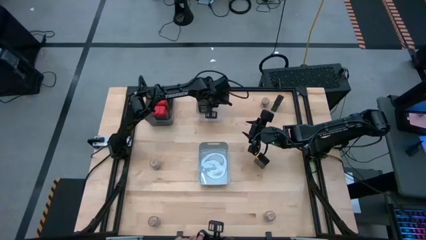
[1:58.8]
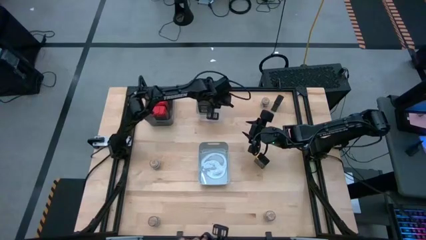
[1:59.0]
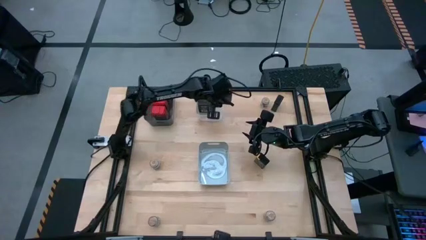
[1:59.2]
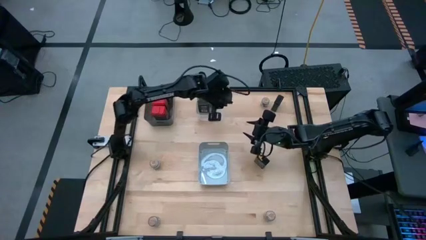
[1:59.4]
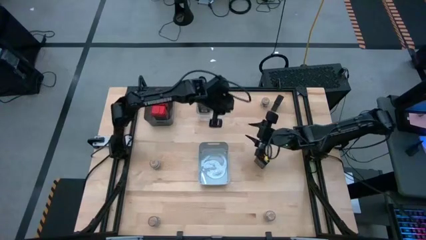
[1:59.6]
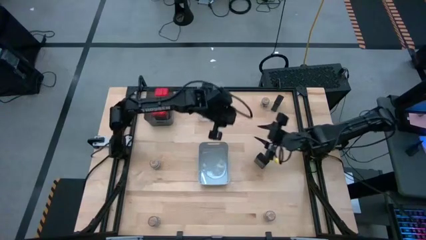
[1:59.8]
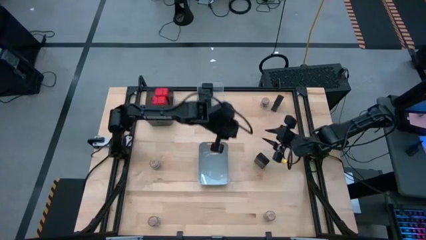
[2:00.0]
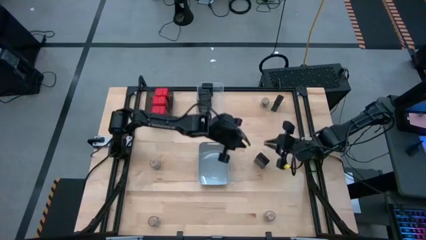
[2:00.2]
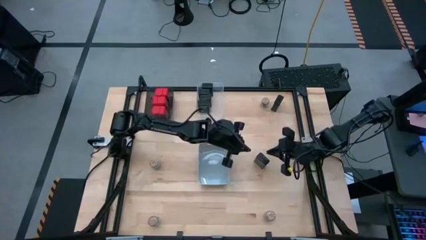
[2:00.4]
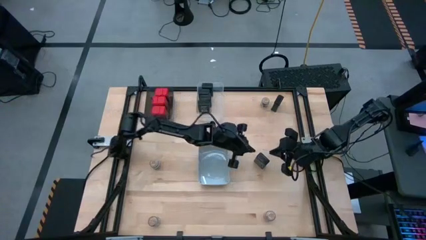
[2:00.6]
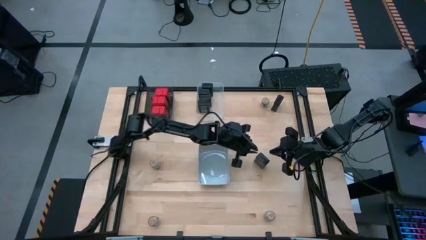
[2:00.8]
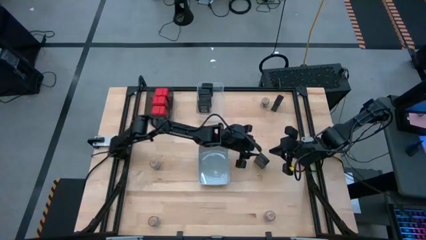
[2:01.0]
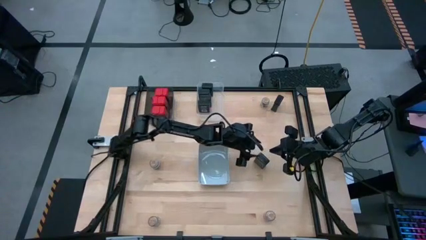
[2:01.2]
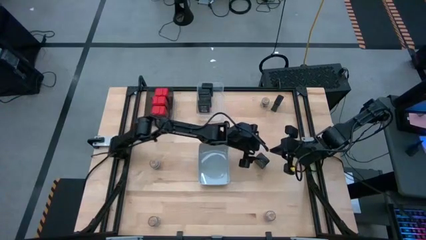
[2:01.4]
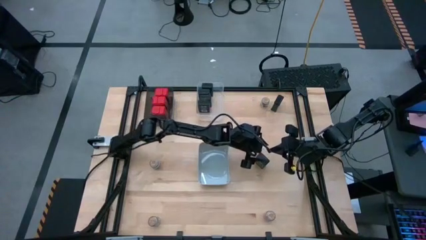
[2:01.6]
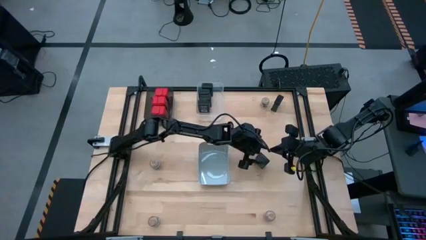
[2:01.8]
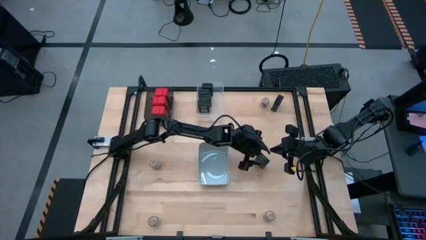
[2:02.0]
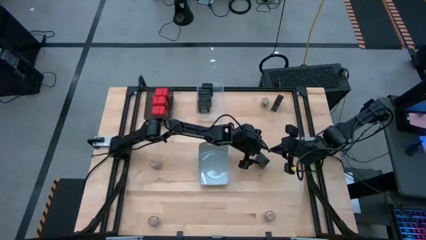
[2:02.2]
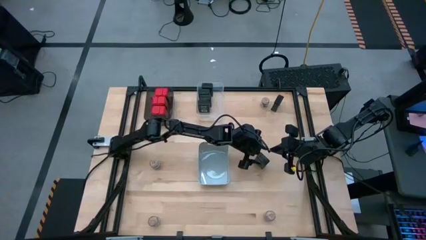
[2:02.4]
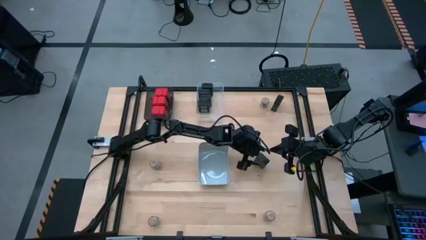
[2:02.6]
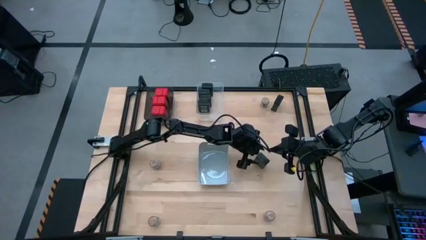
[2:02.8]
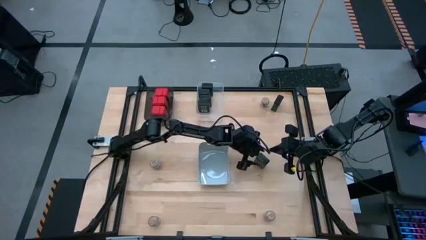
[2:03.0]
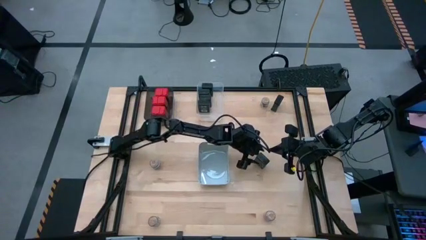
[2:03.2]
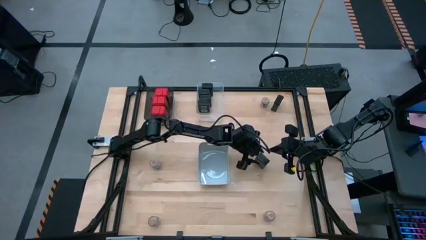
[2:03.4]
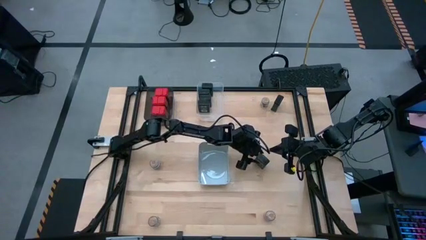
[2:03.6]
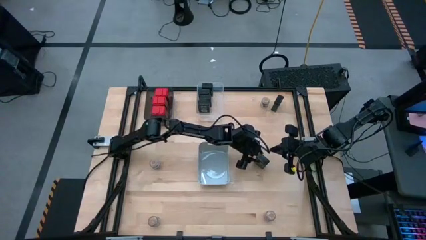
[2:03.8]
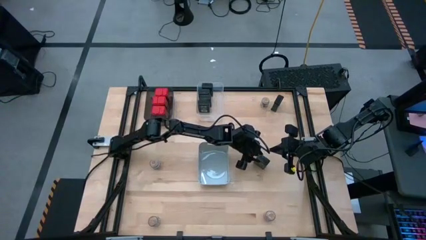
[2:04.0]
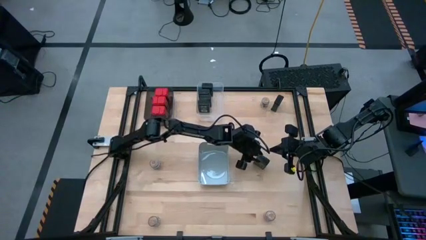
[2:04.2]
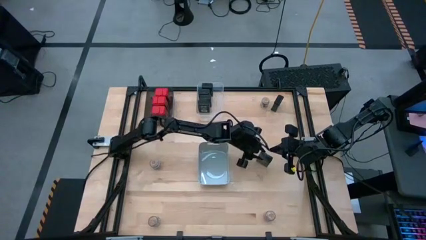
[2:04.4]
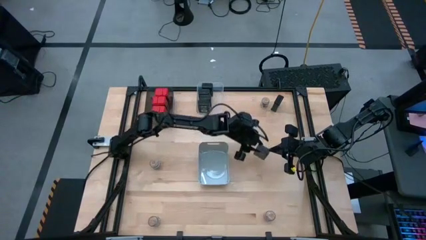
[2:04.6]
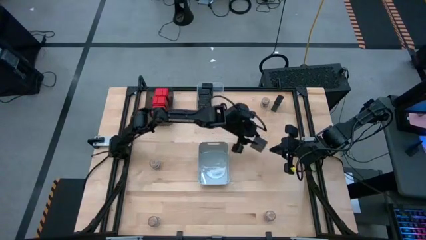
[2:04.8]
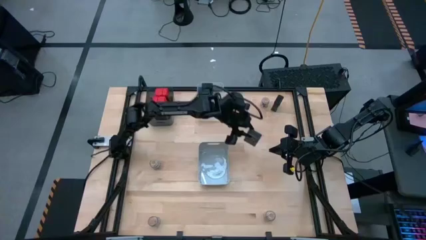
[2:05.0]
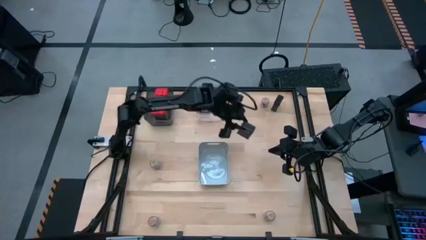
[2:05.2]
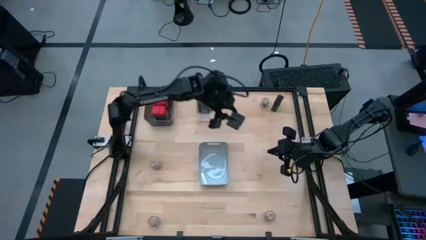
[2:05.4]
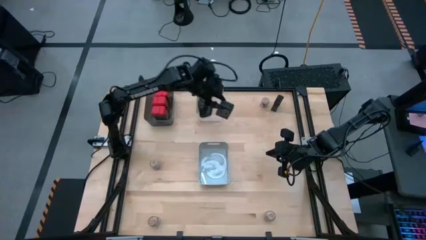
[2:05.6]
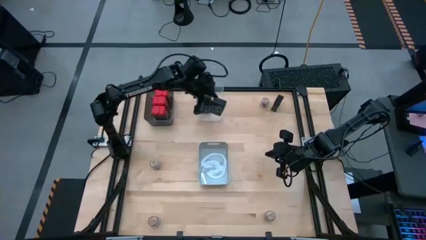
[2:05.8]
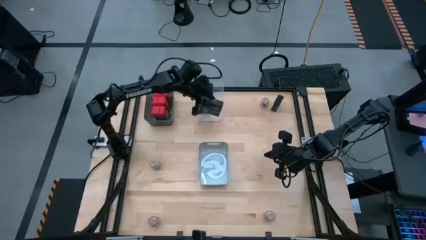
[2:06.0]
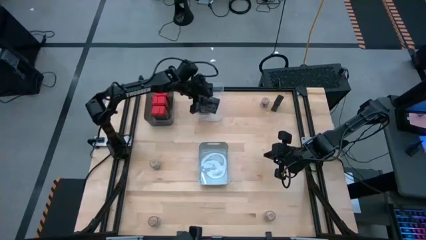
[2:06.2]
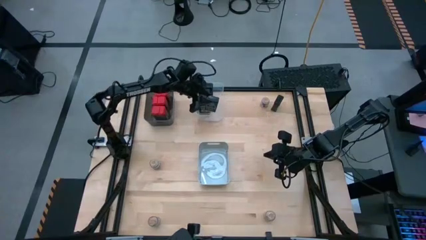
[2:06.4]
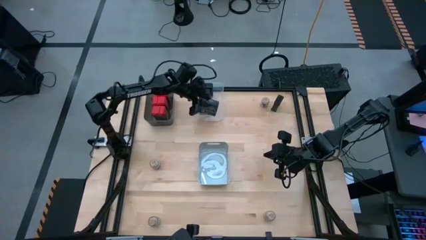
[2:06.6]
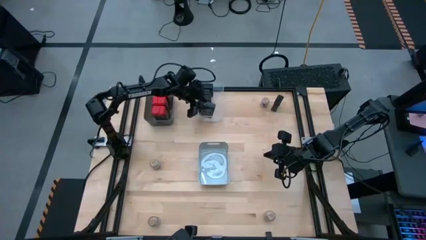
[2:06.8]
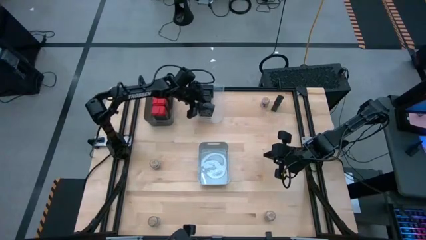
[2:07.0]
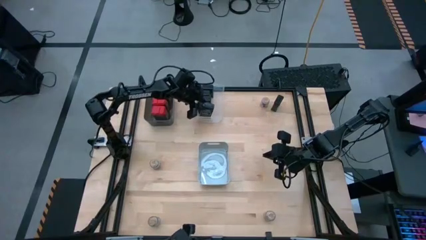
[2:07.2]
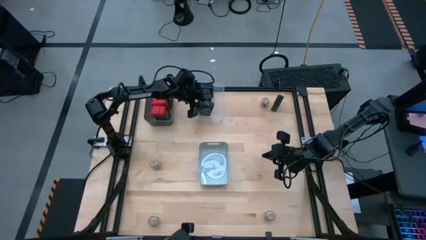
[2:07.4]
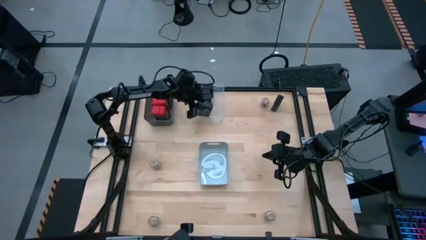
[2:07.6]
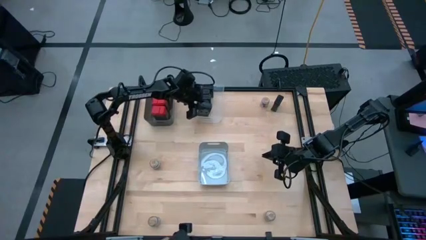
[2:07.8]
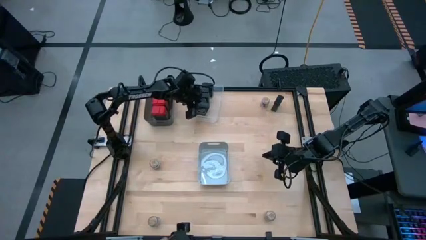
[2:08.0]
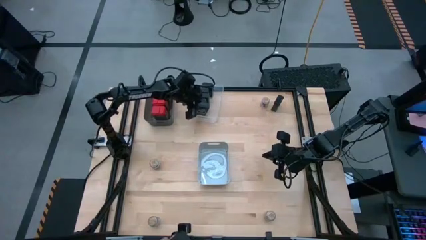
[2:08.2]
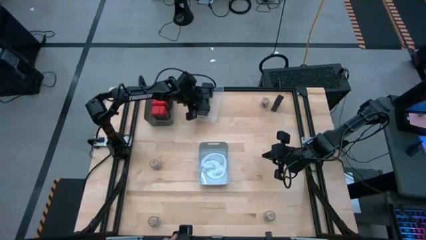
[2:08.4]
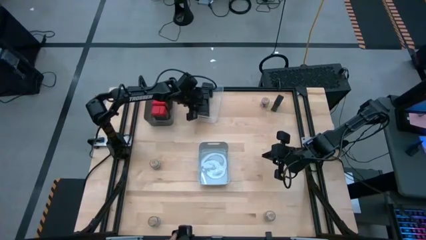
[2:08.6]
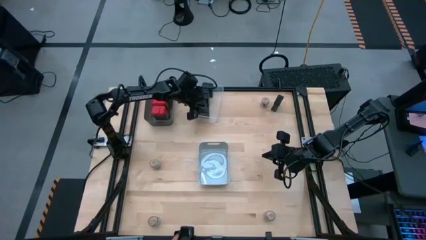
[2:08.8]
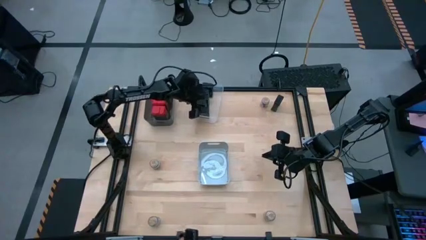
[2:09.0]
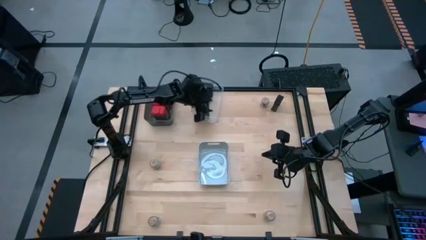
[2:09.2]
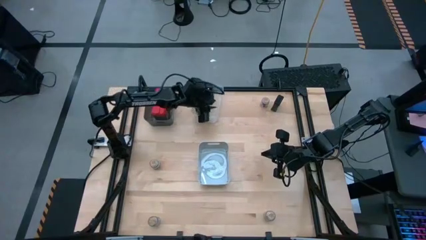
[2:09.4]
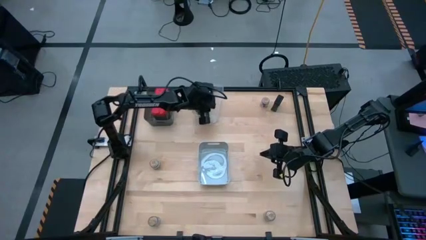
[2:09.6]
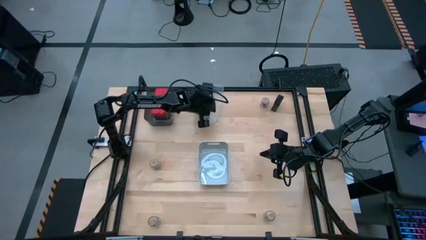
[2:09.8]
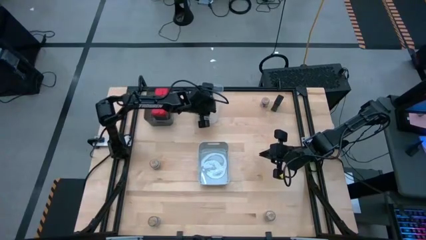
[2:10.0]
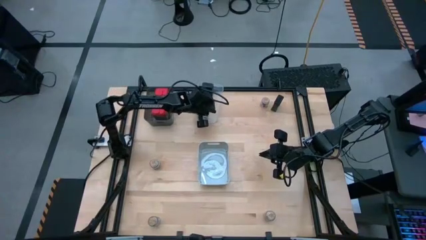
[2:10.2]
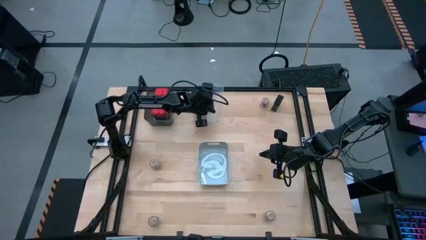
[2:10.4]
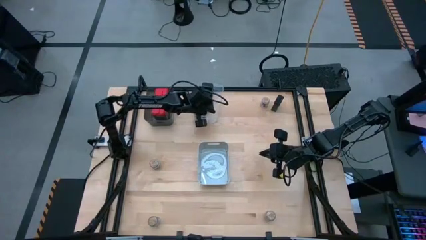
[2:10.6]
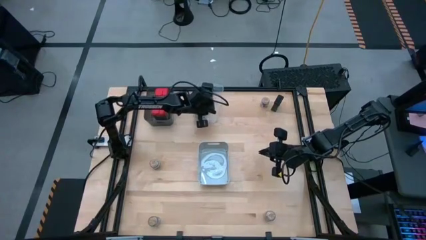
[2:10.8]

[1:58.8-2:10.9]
Task: Sort spices by type
Put the black seasoning can into the transparent bin

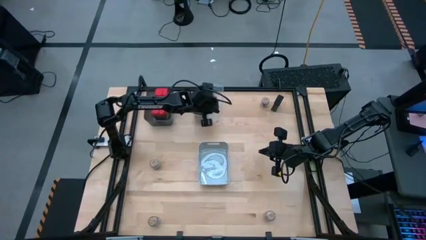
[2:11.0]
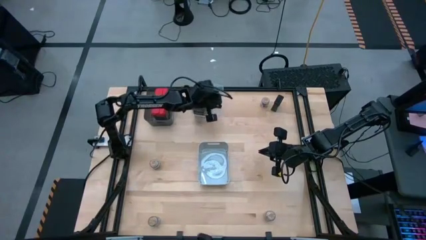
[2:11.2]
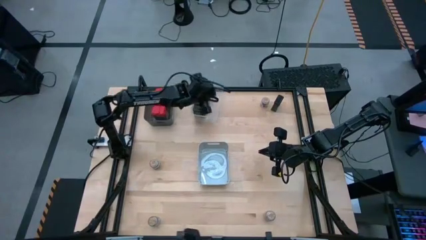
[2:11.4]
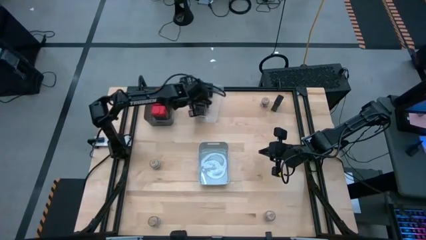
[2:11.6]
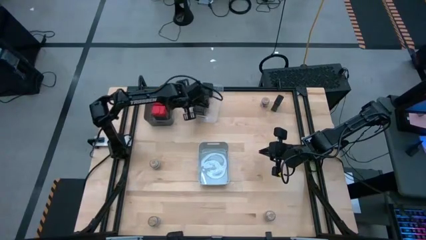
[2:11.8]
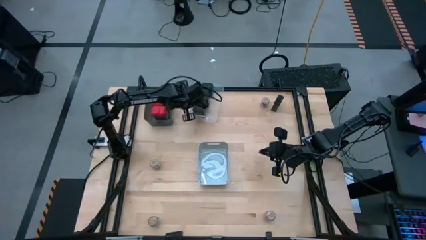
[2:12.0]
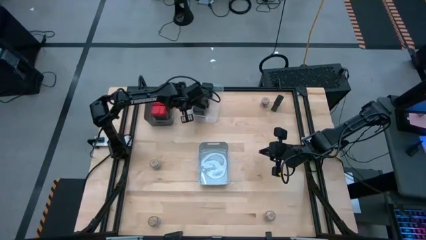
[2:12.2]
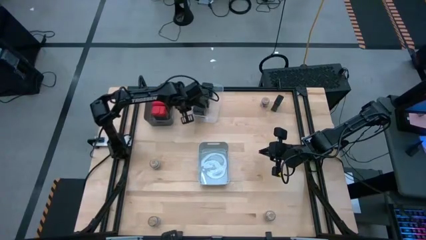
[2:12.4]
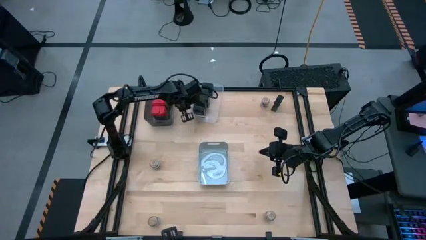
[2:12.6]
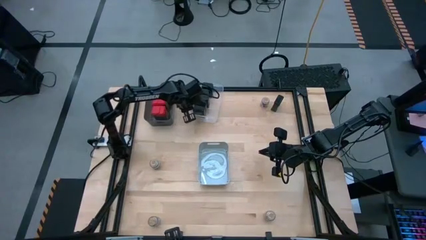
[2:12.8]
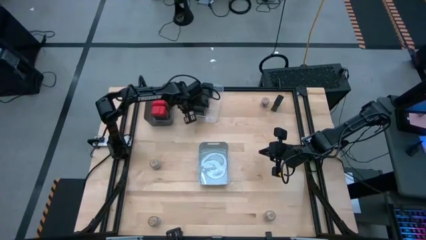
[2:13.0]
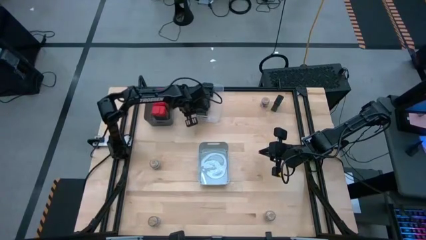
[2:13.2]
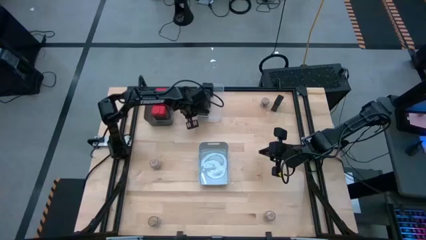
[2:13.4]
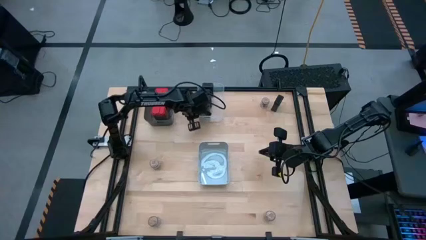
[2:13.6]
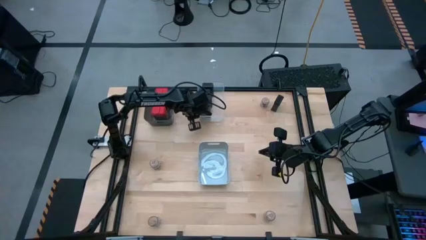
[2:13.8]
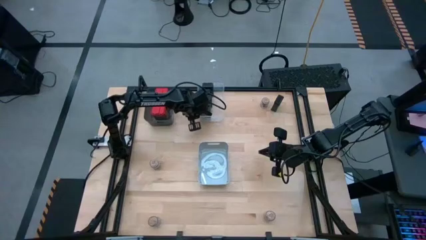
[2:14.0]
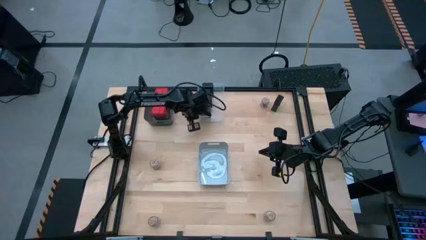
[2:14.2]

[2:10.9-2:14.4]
Adjust the transparent bin on the table

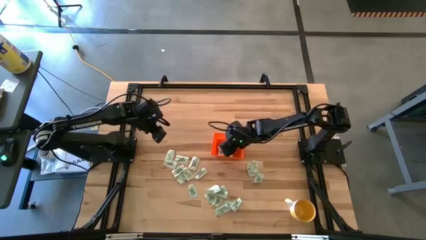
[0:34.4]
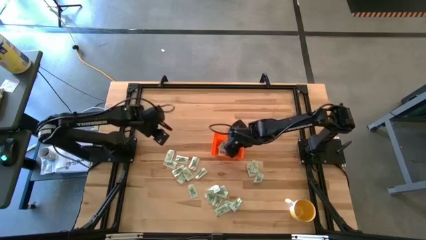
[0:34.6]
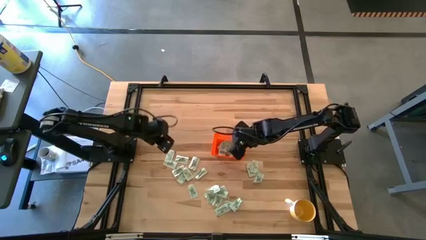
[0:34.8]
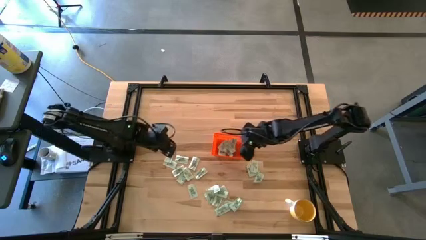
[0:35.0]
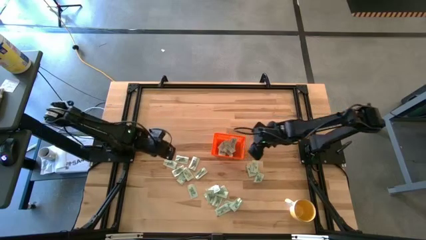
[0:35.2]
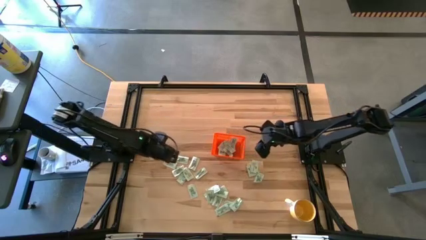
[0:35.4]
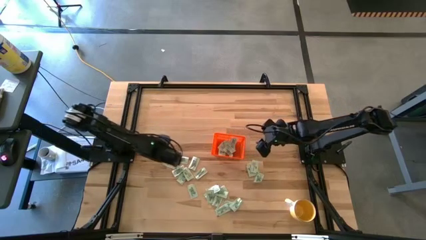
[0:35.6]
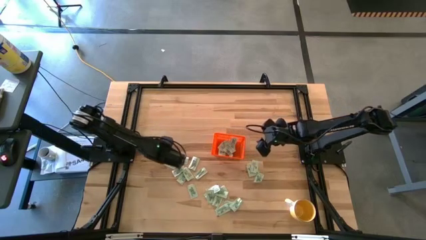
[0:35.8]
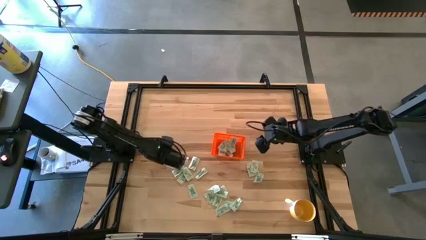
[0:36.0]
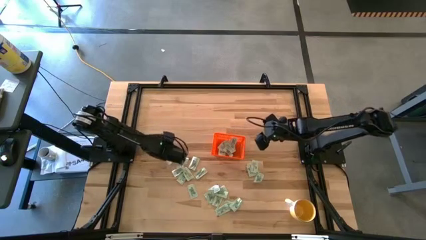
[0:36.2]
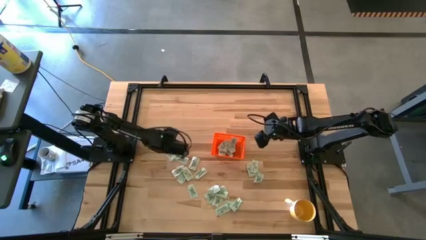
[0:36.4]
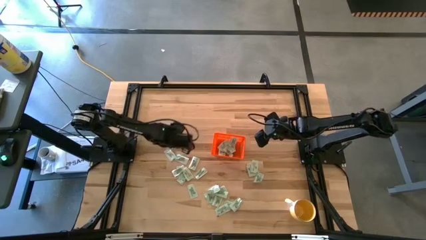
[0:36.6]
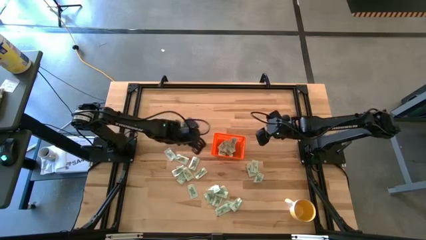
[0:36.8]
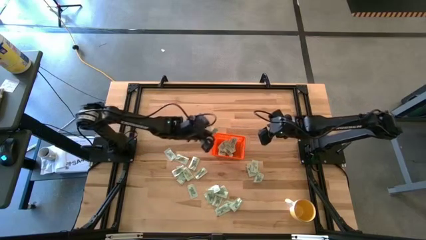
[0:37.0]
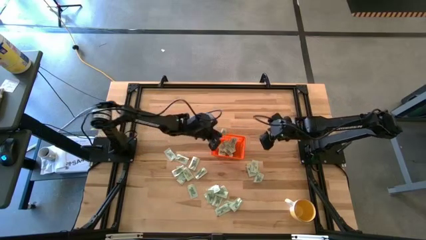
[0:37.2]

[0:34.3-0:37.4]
Task: Pick and place Stevia / Truvia into bins
Put the white stevia packet into the orange bin
